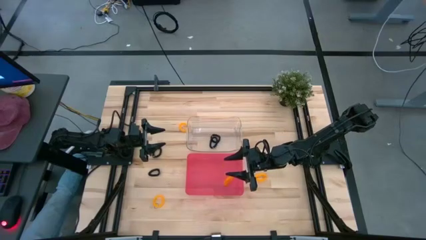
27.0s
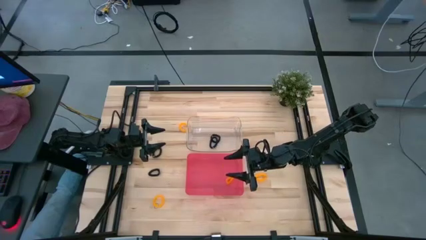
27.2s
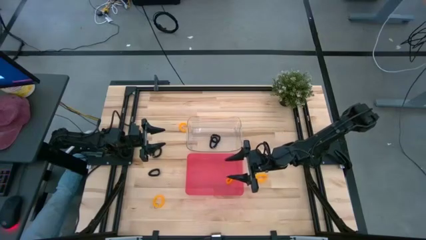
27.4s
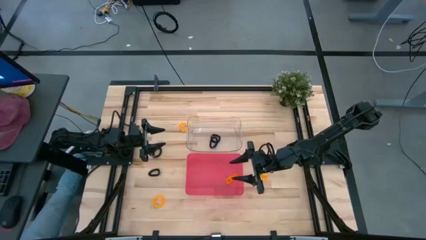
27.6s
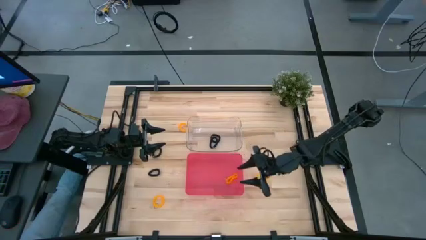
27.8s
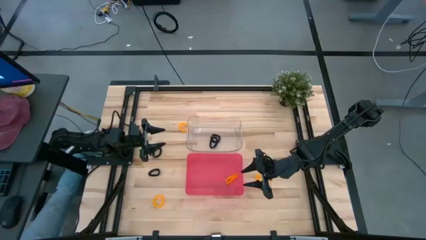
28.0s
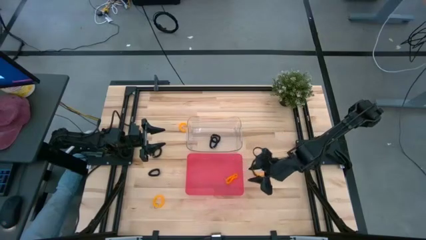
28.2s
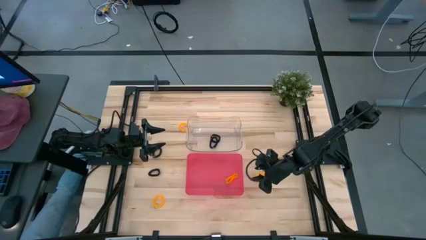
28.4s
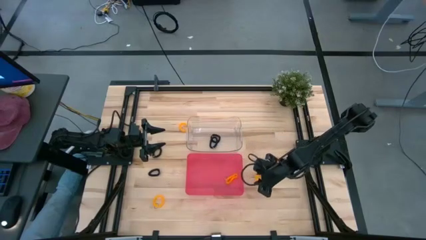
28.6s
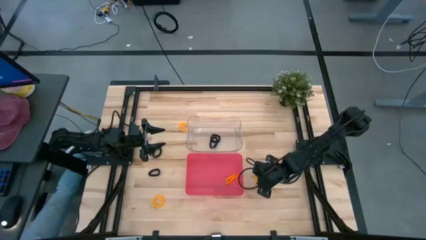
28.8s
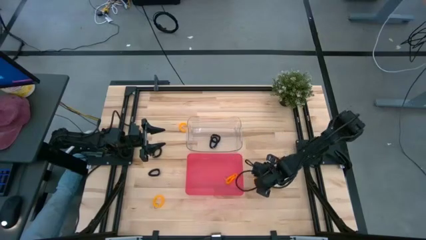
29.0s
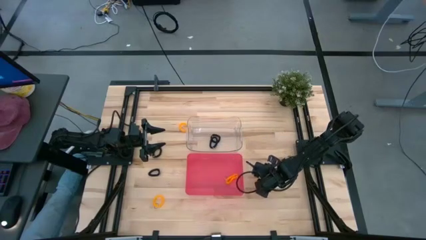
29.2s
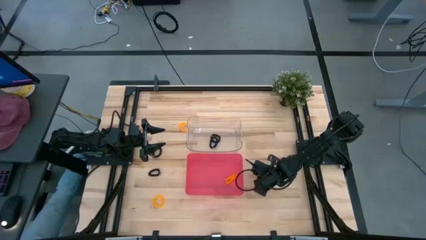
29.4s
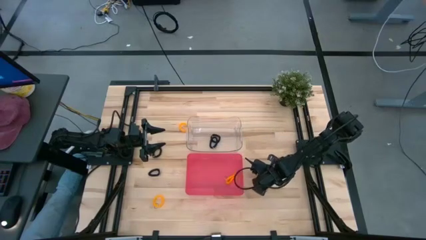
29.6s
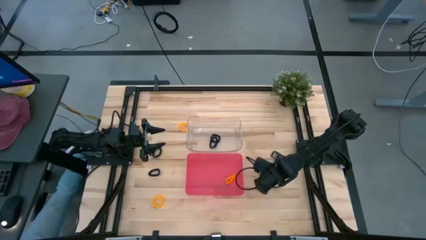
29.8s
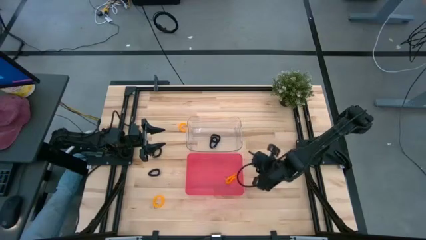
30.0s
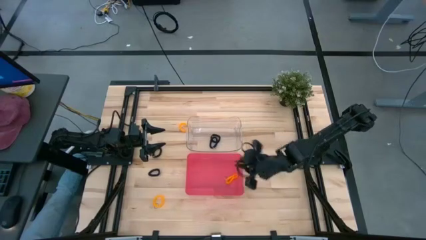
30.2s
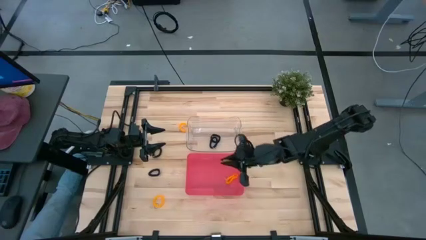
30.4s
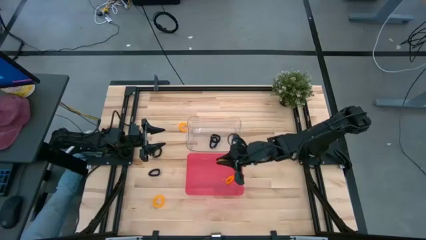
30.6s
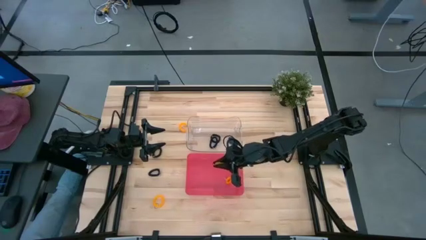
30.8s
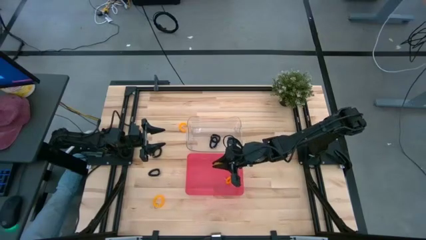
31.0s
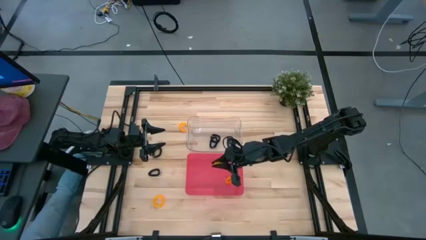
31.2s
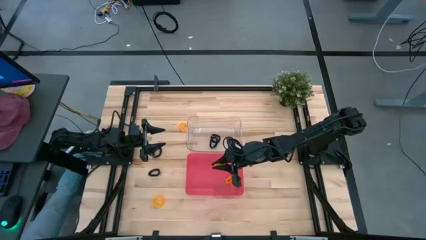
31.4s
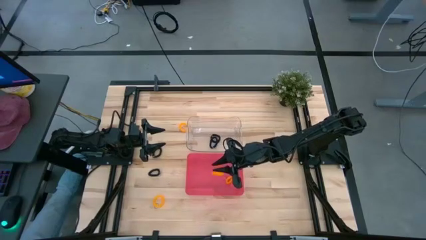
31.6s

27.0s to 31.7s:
Task: Sort spring keychains
Put the yellow spring keychain into the red bin

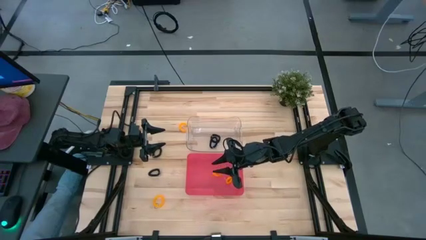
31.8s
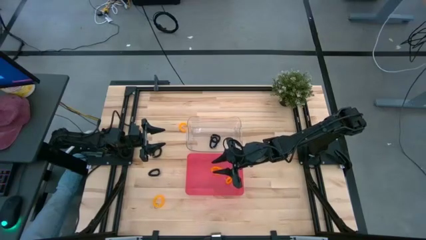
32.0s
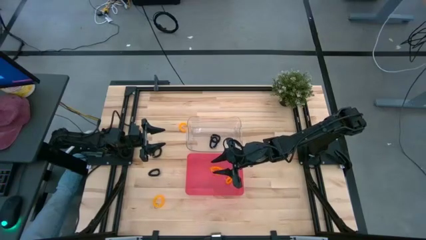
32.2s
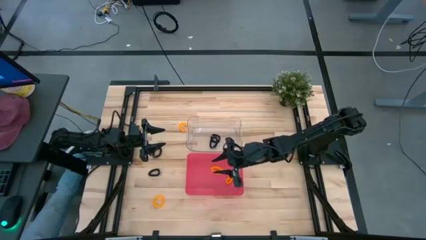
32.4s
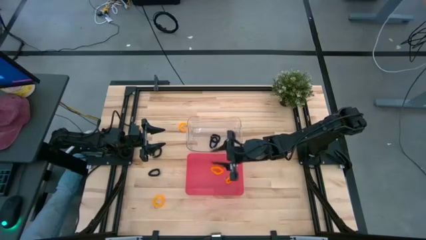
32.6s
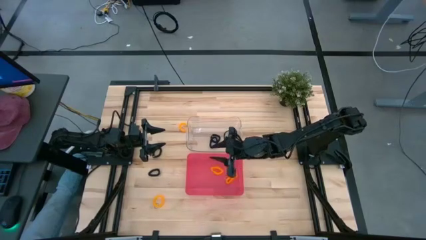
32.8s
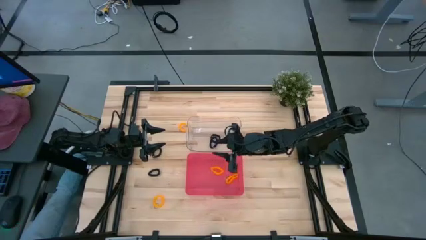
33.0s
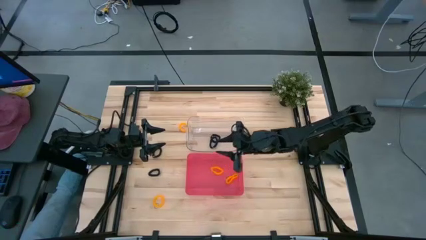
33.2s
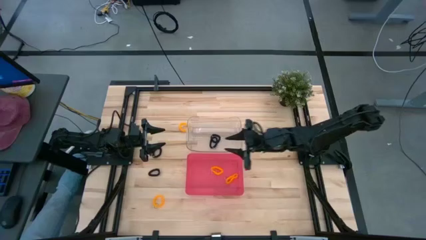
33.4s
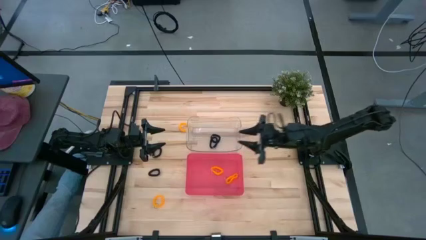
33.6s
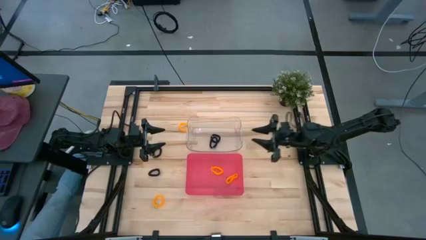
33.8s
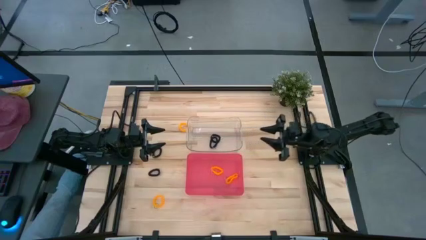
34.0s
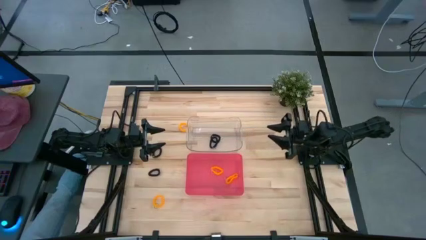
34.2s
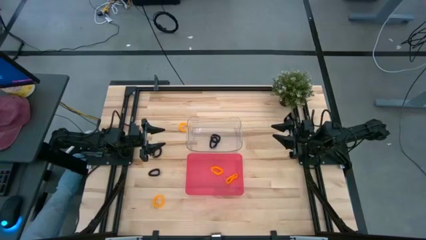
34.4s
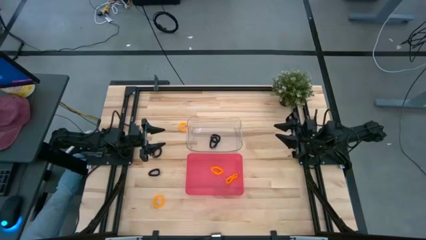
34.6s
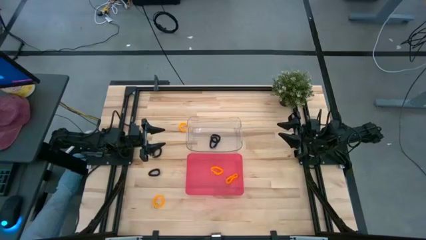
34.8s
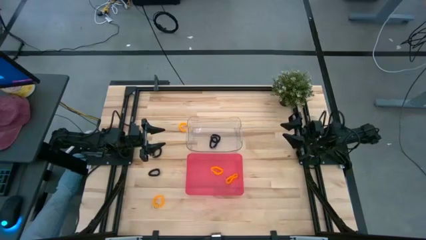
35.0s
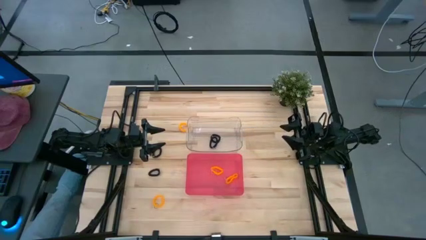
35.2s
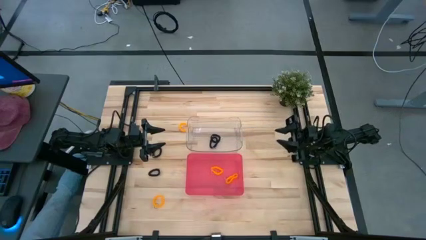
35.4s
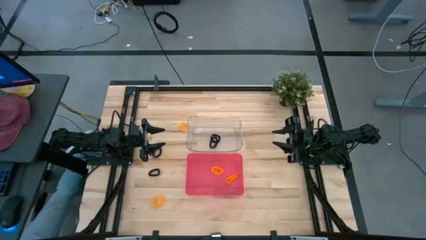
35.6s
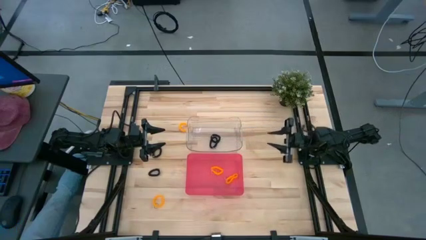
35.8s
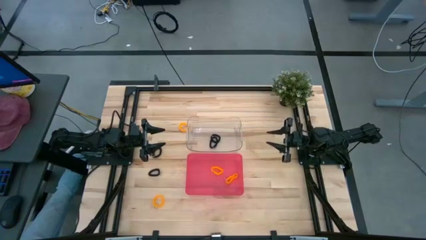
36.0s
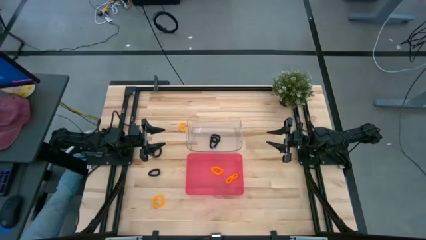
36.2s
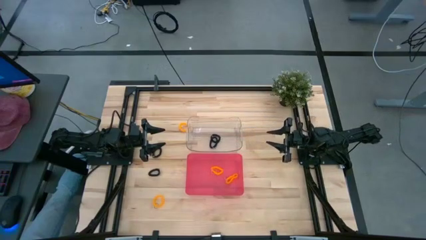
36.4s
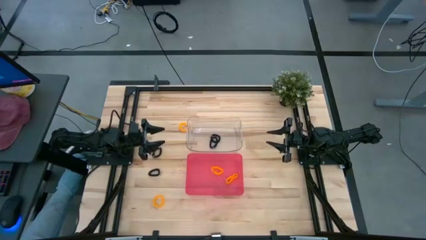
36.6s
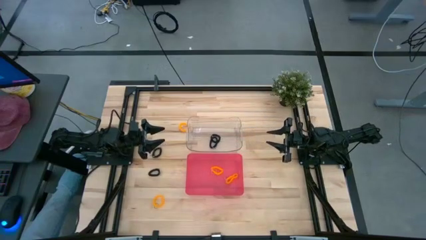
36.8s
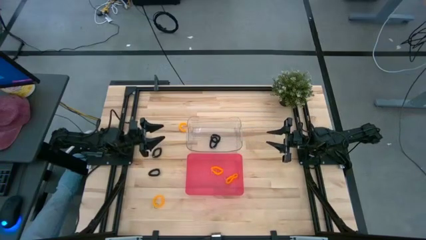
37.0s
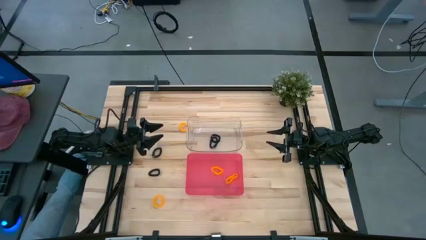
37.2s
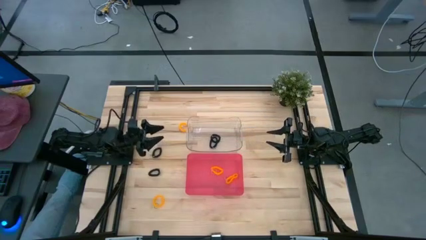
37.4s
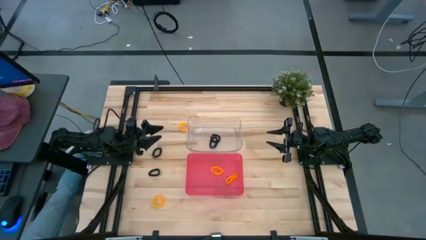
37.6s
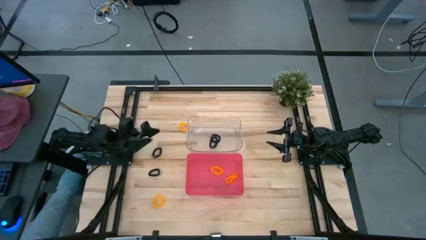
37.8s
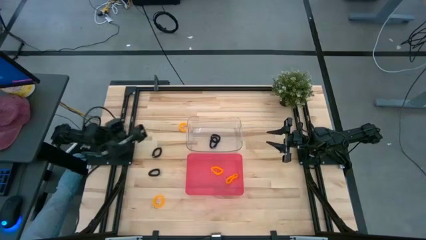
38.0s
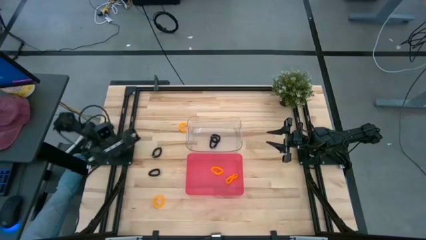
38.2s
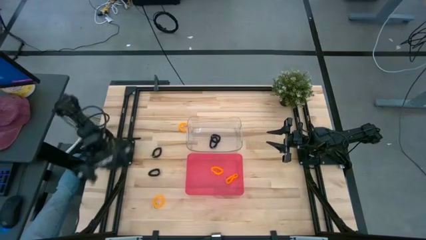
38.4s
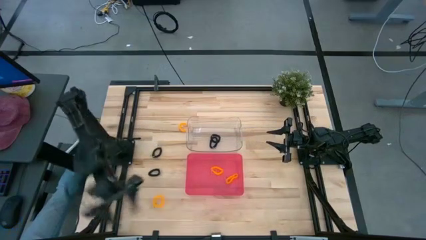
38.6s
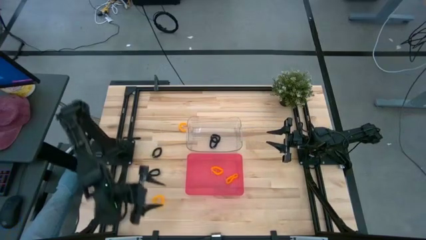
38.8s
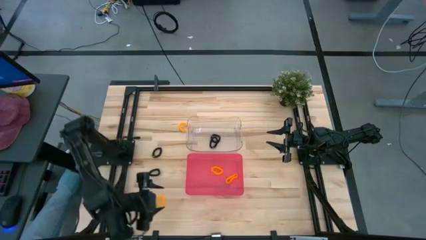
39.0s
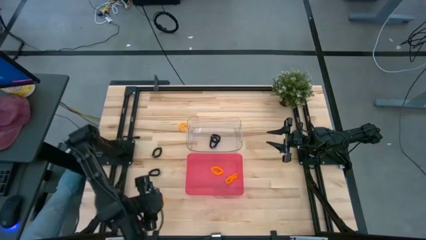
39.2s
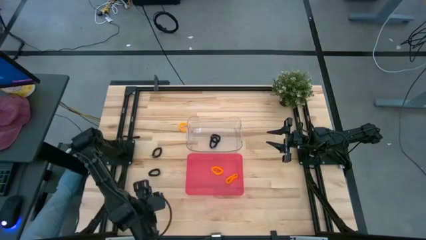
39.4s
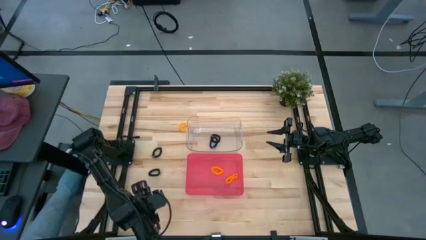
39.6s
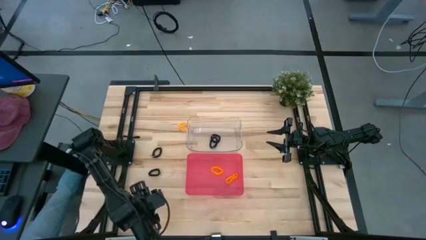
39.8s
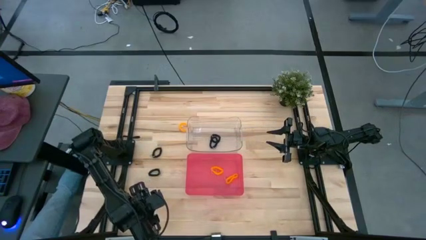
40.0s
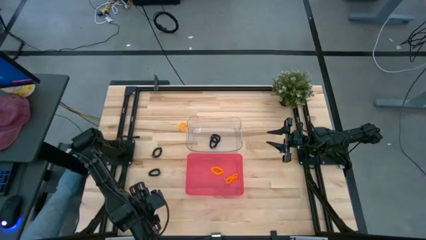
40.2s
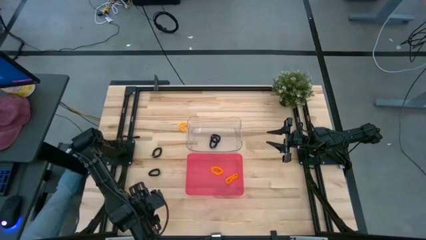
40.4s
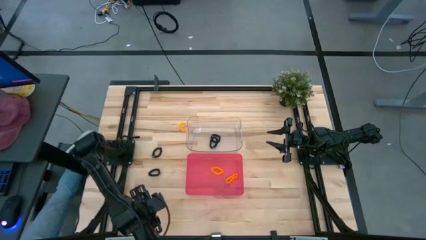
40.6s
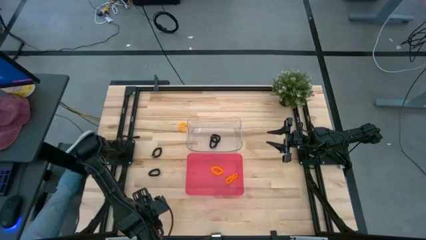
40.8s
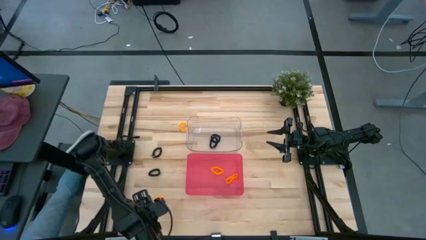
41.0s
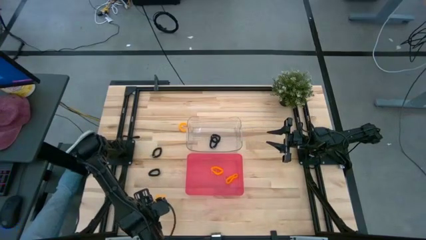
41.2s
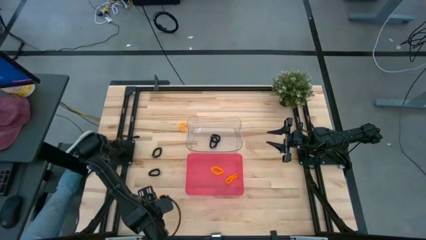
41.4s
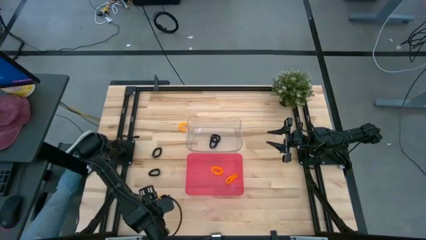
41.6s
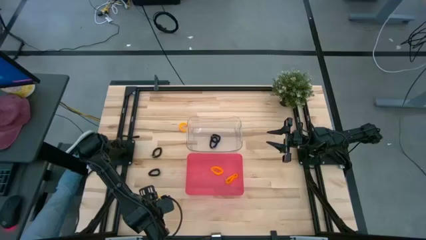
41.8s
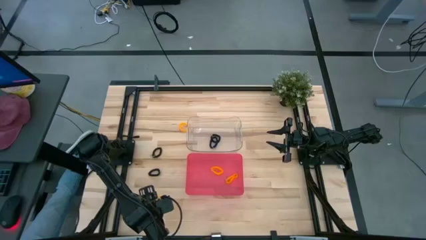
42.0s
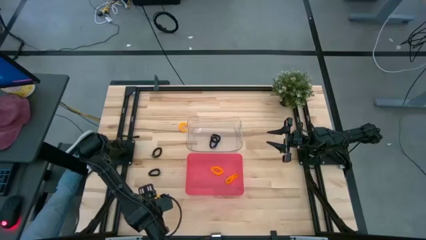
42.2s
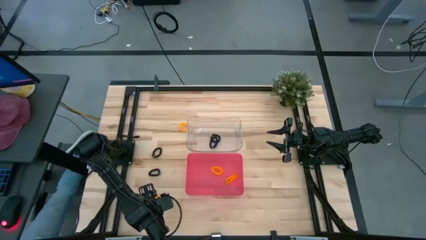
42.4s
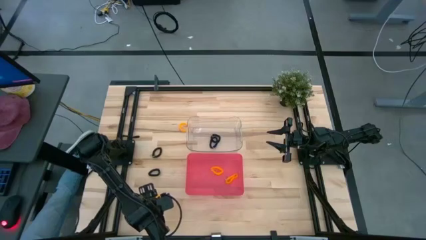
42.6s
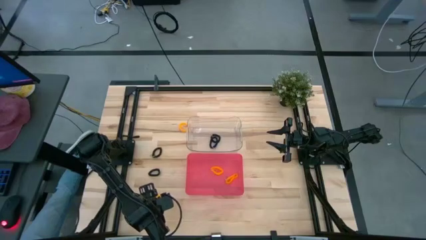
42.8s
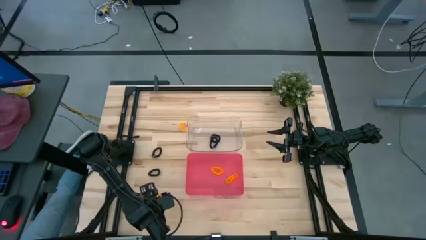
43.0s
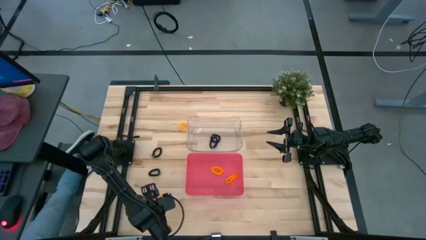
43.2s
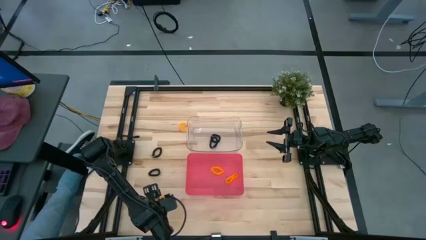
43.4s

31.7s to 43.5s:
Put the yellow spring keychain into the red bin

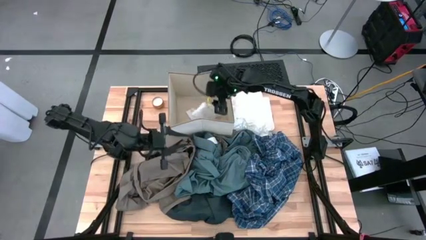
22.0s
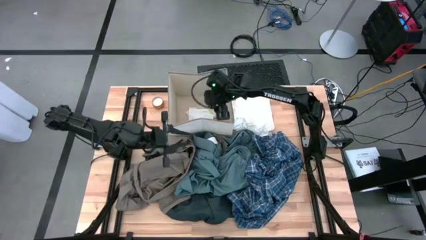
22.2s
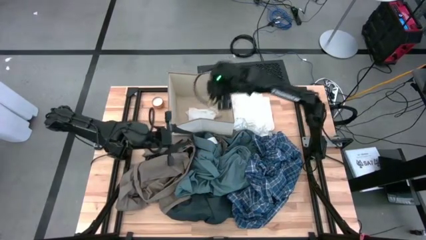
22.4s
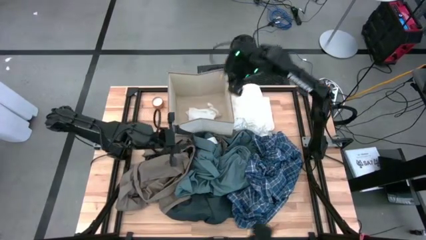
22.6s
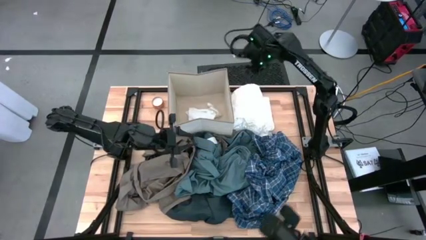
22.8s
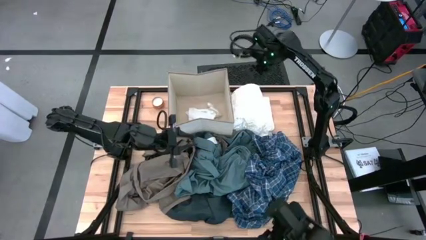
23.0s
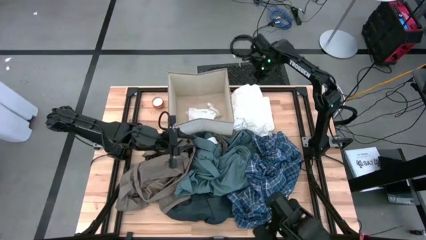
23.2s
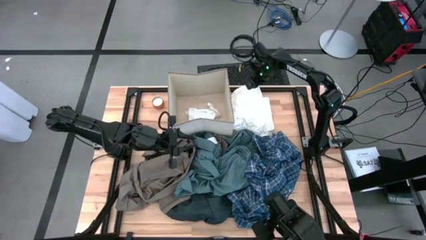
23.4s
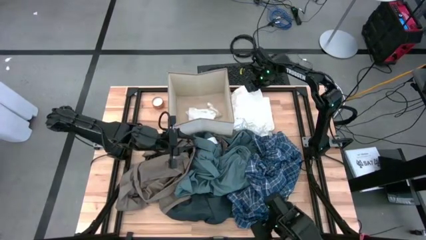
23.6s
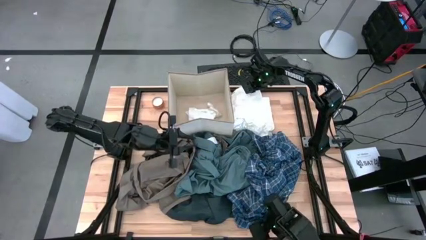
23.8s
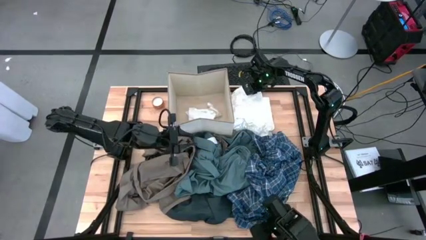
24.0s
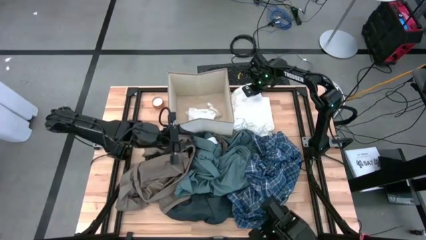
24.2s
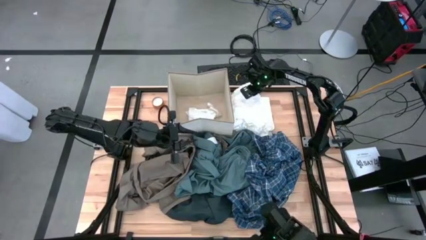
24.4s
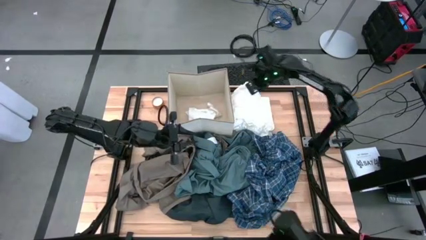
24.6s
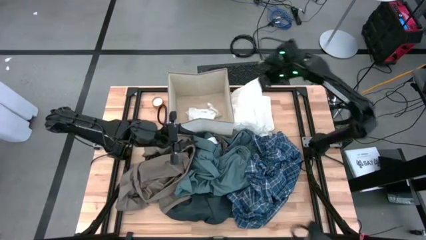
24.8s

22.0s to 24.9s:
Task: Sort clothes
Put the white shirt into the laundry bin
